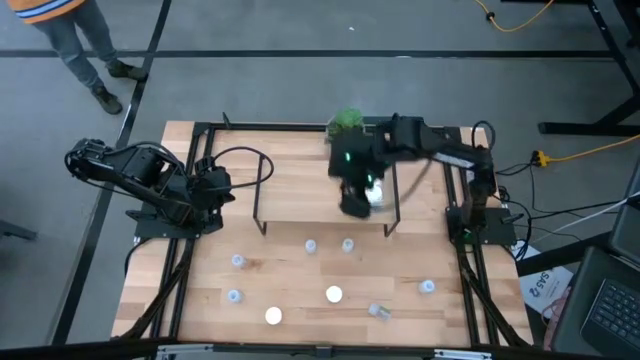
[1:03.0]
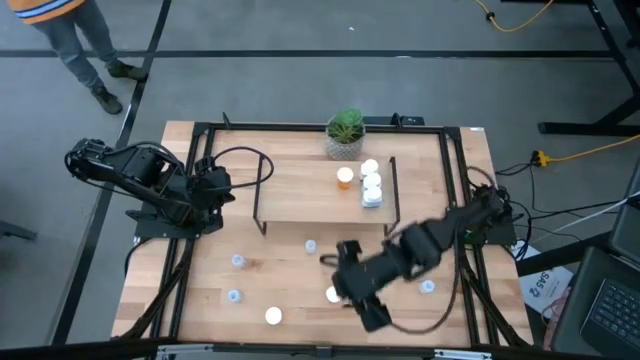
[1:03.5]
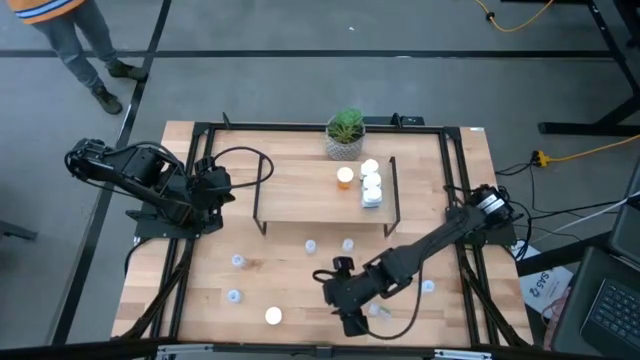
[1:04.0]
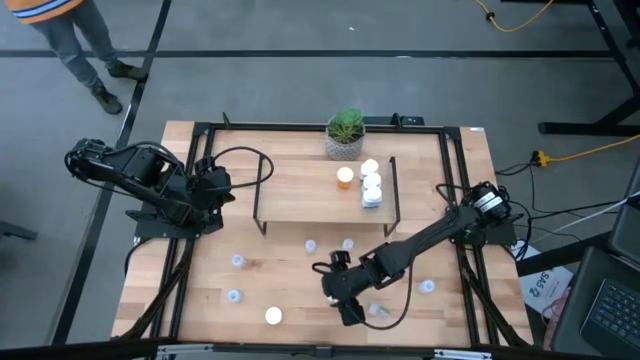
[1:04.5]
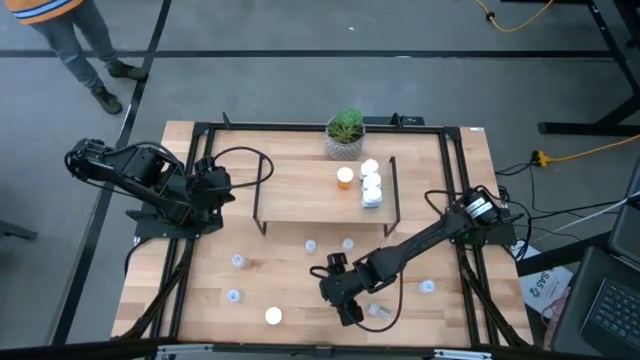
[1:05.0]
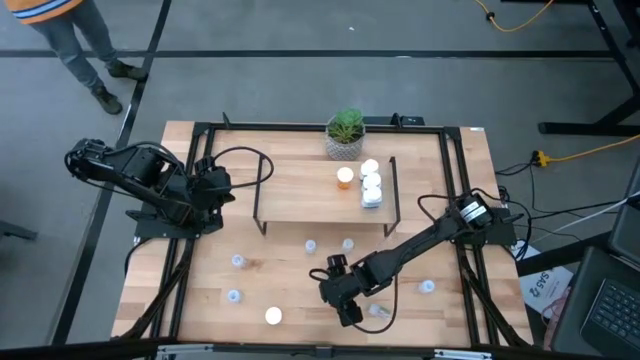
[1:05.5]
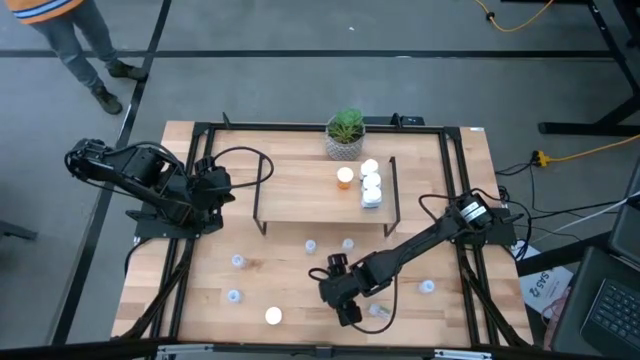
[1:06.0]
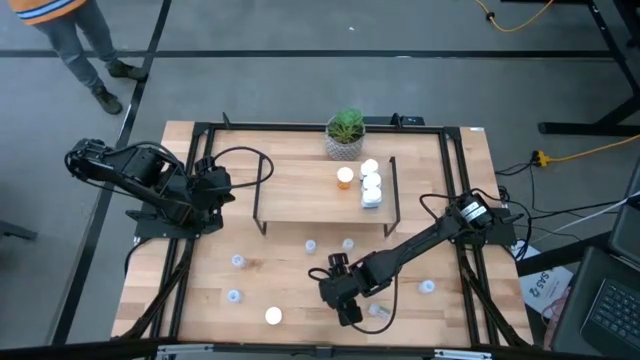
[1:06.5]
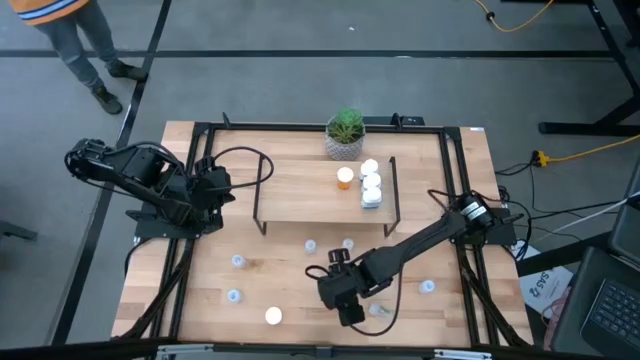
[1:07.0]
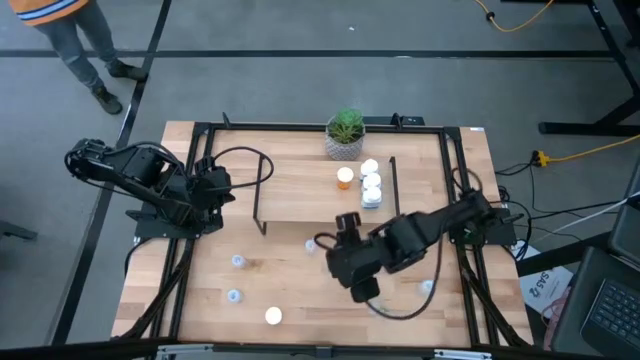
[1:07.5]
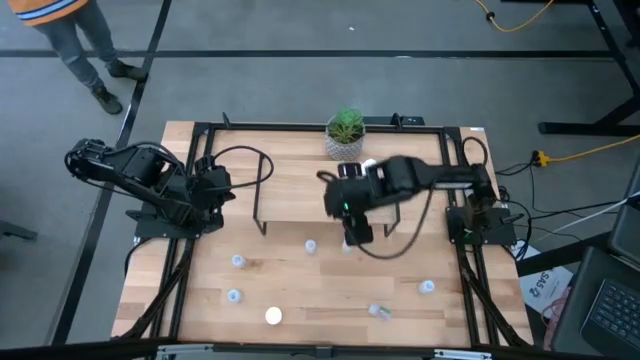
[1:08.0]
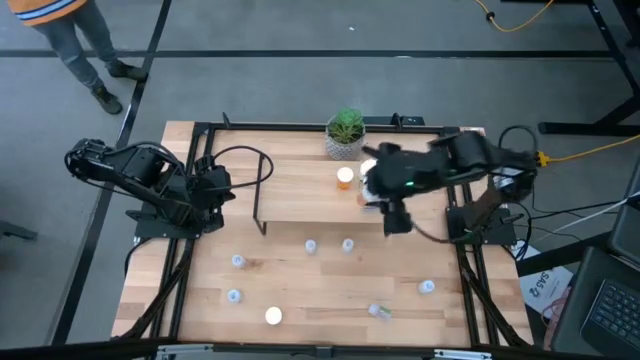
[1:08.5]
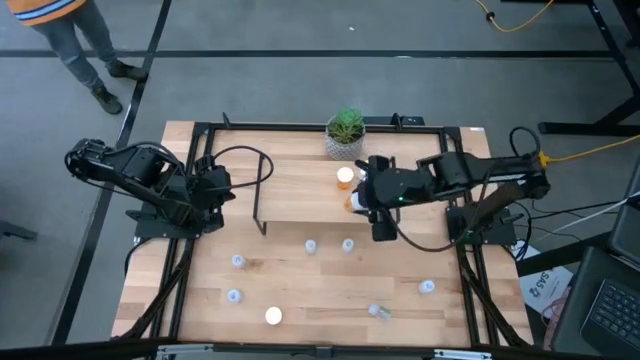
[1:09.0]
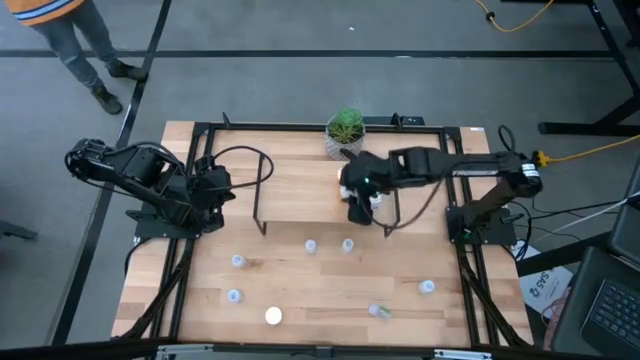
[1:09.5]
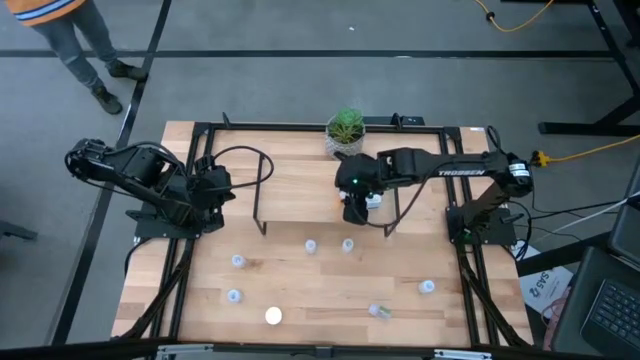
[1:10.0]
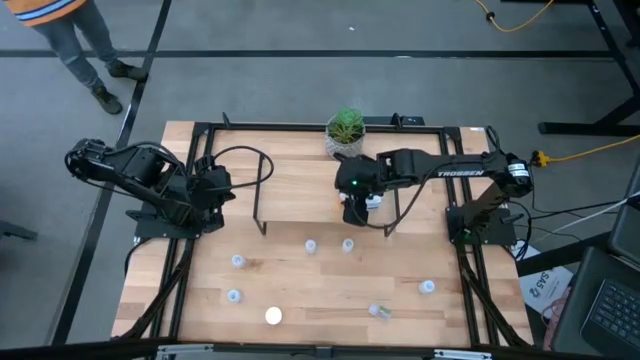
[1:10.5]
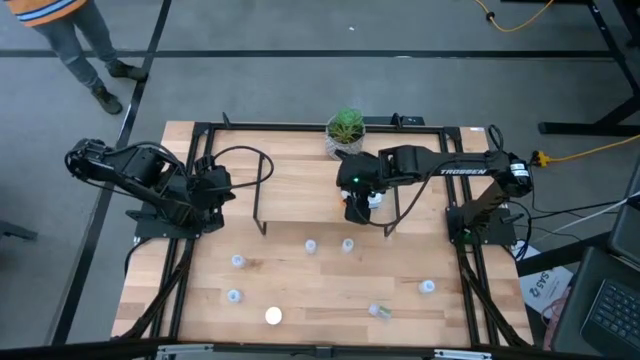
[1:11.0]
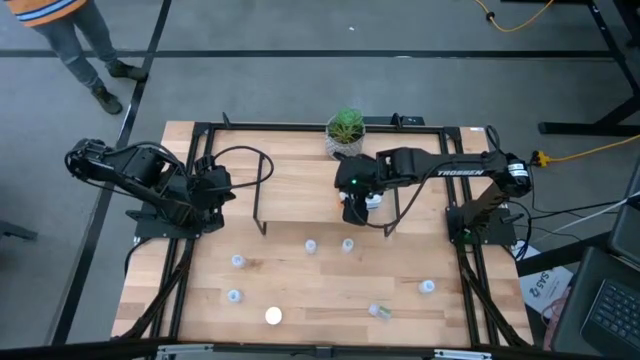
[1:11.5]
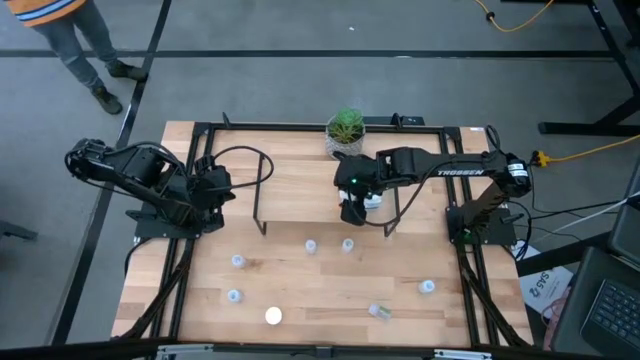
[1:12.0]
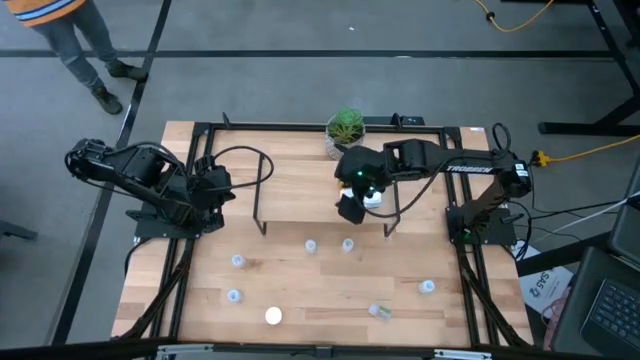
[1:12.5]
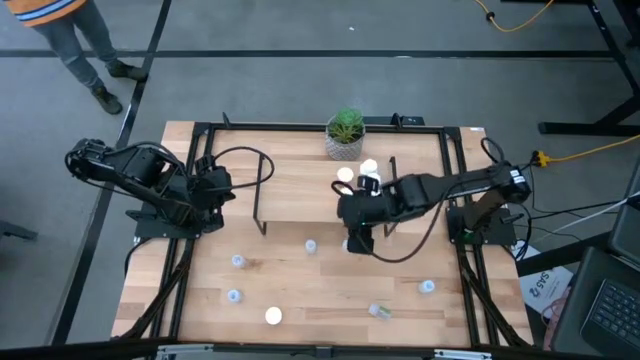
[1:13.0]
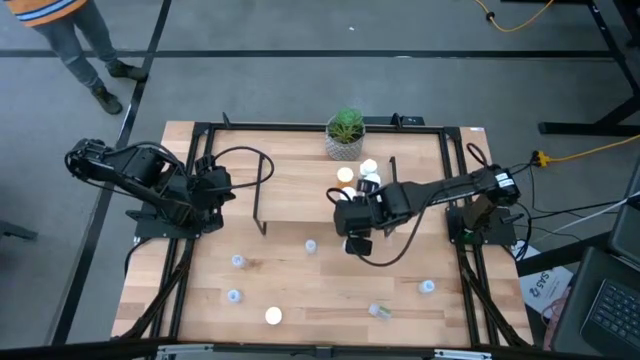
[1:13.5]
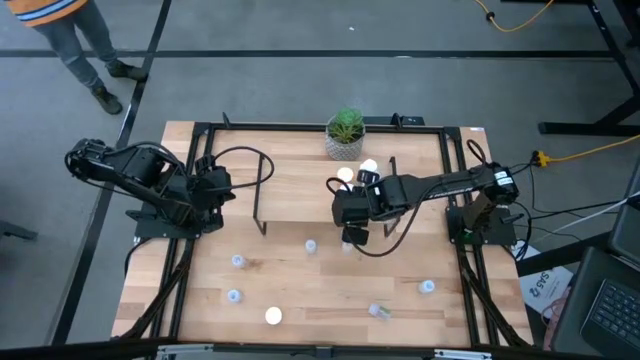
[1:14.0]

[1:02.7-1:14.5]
Task: Pick and place medicine bottles onto shelf by color
Put the top orange pill bottle on the shelf aligned with the other orange pill bottle

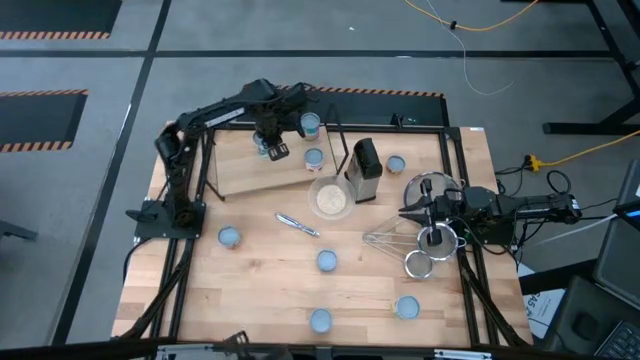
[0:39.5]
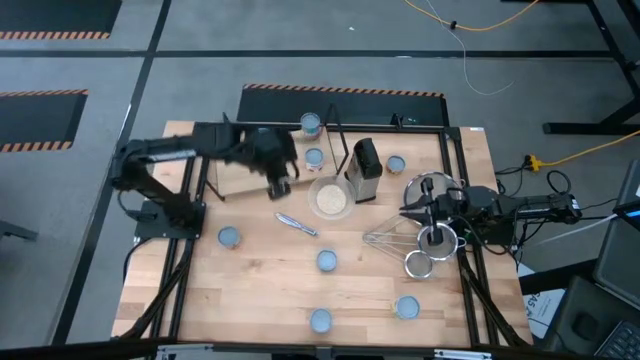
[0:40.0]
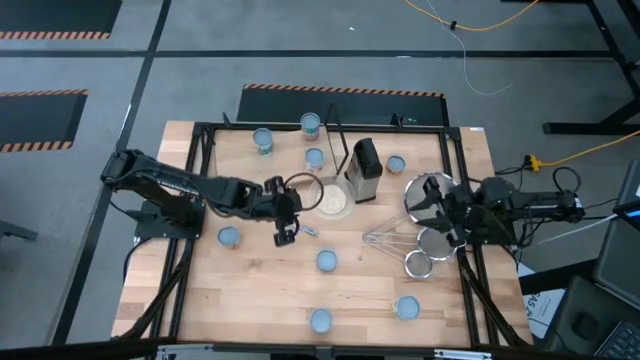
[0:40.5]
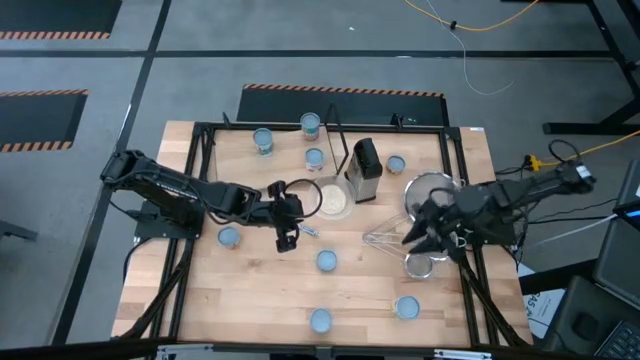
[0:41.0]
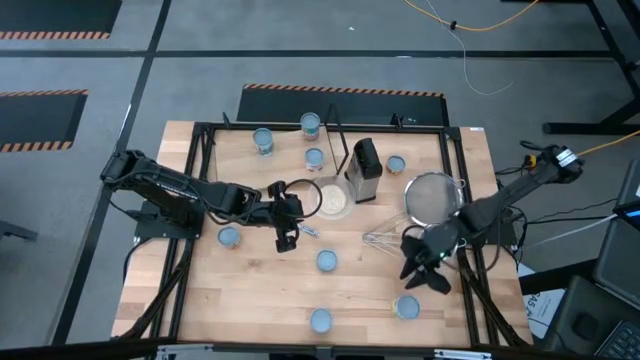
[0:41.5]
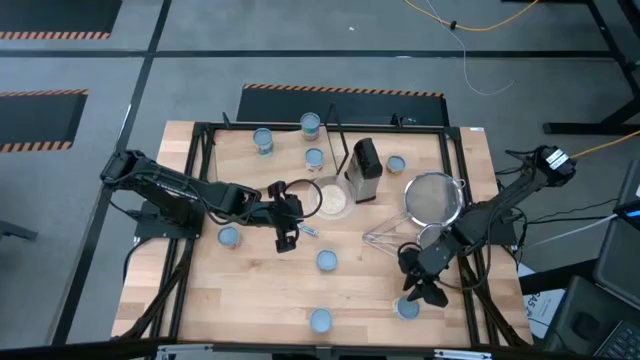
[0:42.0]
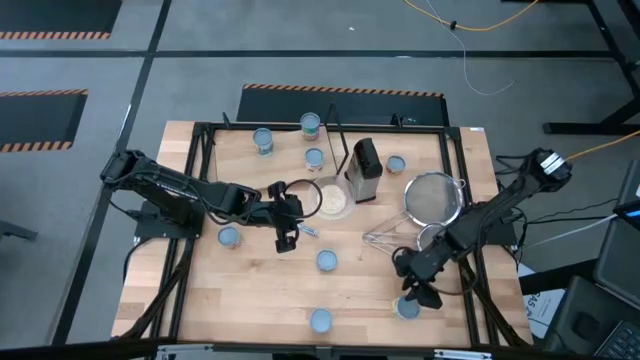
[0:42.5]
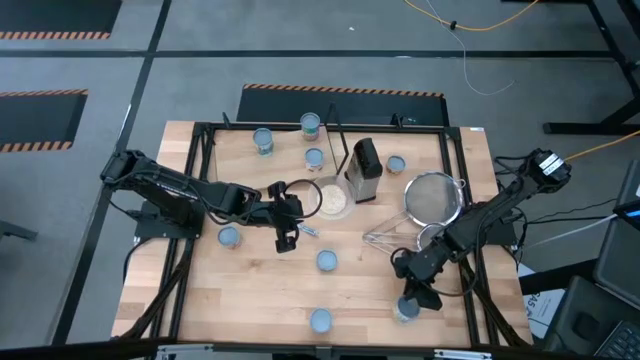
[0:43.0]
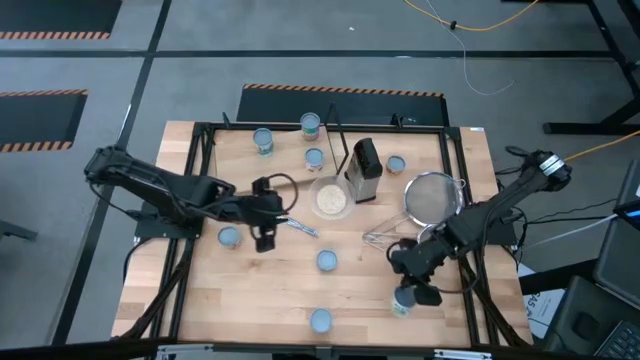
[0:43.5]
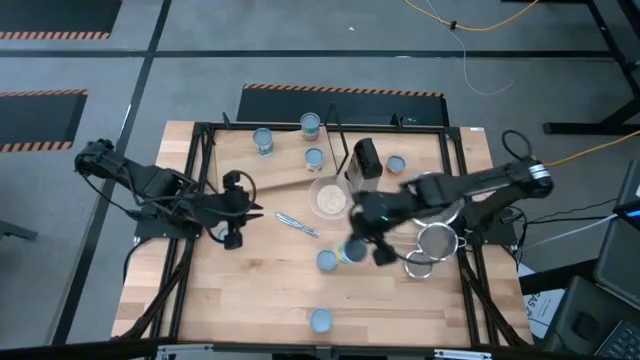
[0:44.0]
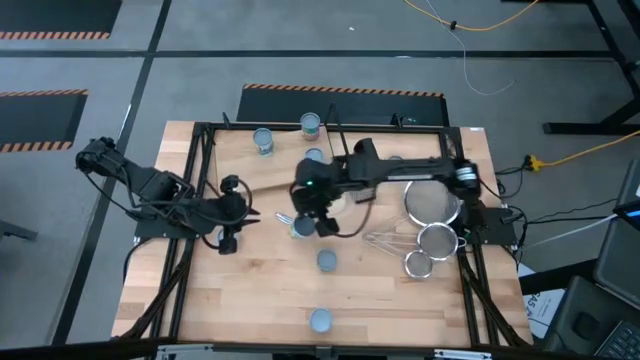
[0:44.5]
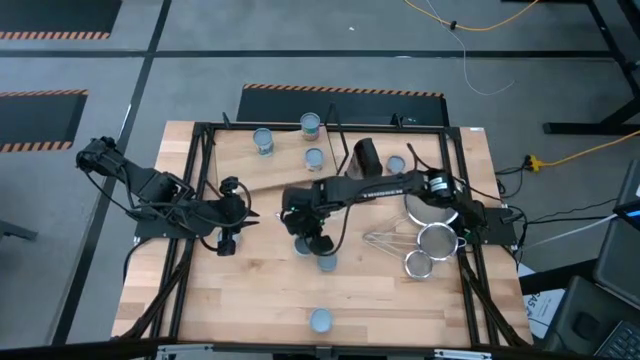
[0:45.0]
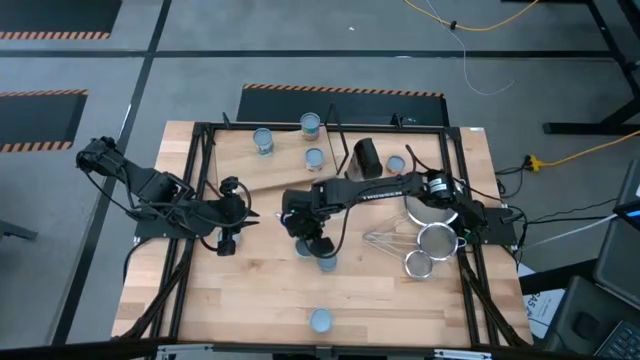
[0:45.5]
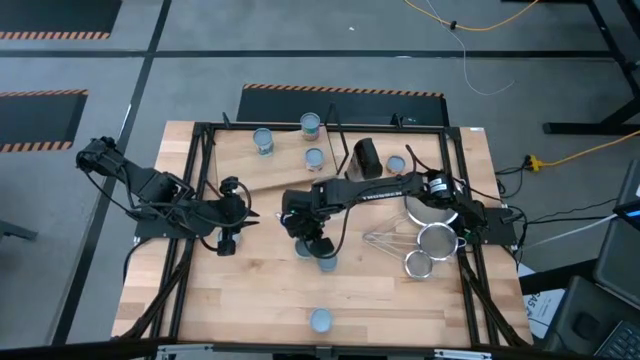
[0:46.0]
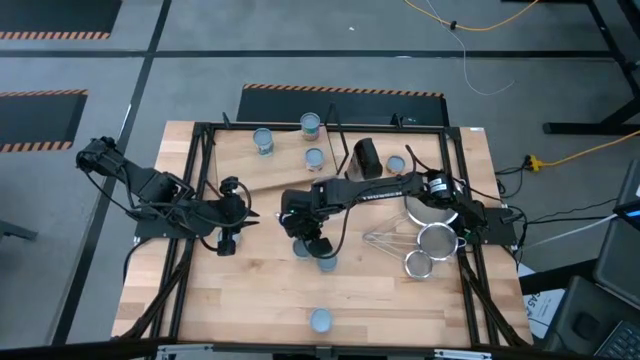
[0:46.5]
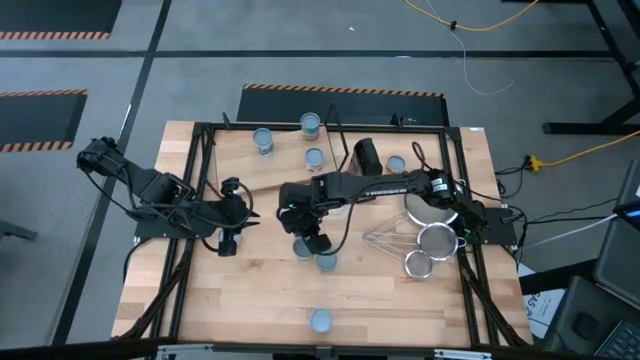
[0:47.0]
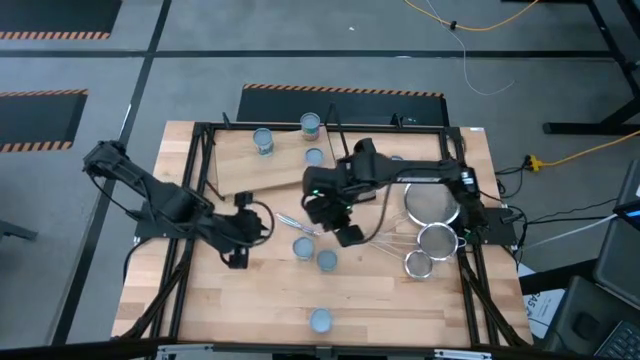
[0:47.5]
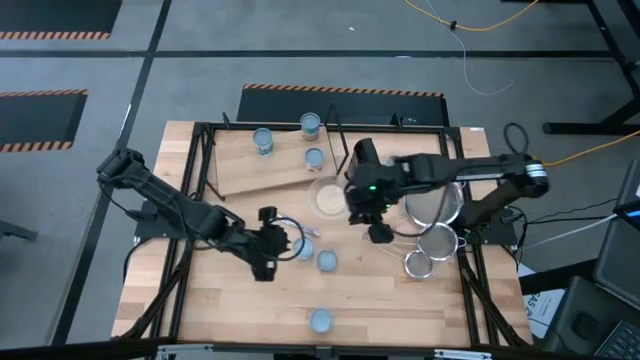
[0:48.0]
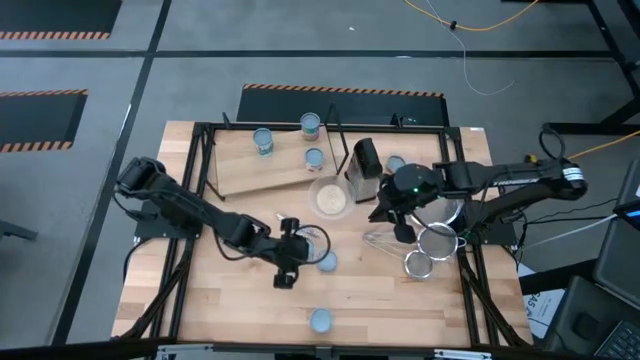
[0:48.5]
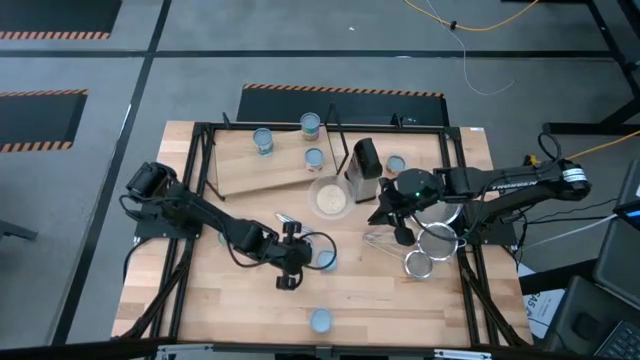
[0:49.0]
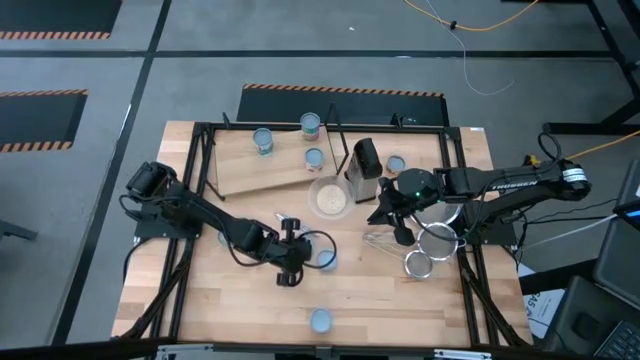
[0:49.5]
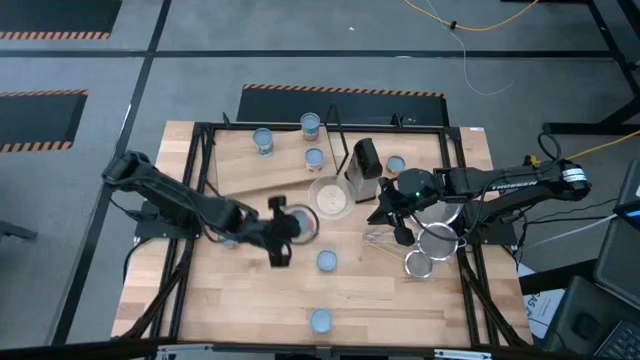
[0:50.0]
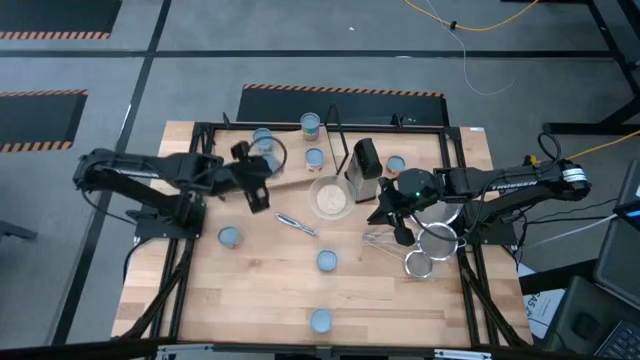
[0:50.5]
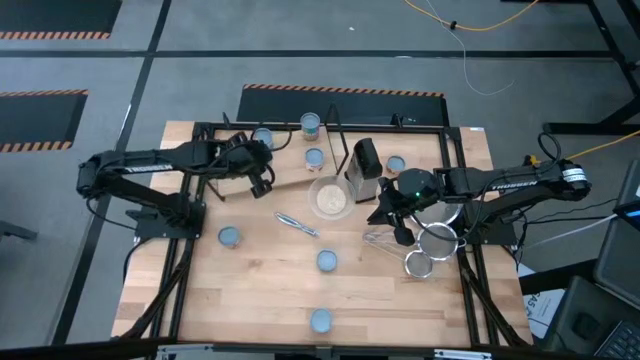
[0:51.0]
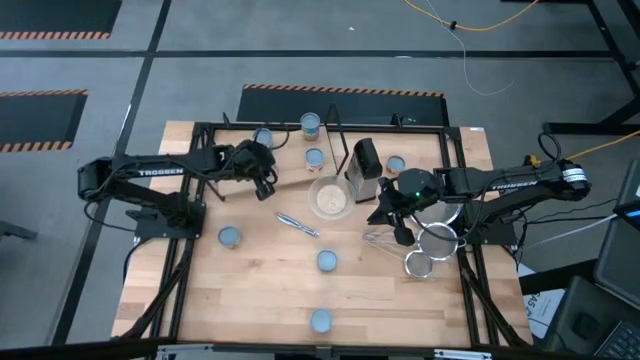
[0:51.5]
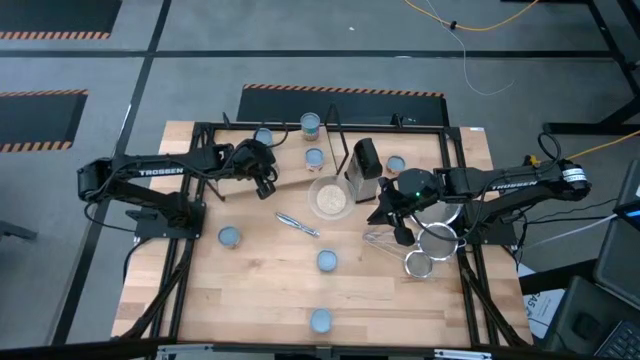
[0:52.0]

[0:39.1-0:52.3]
Task: Pick and place cans onto a shelf
Put the red can on the shelf aligned with the other white can
